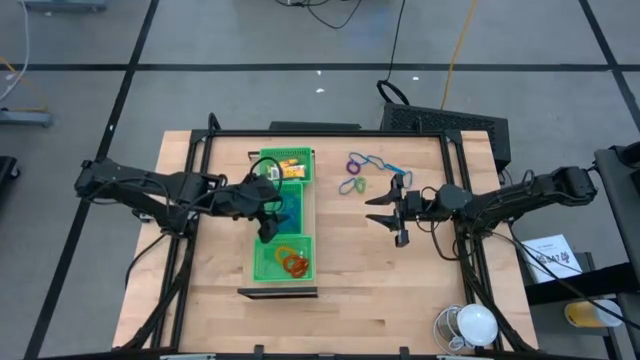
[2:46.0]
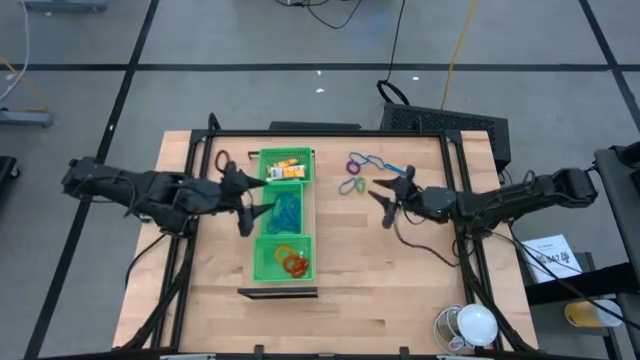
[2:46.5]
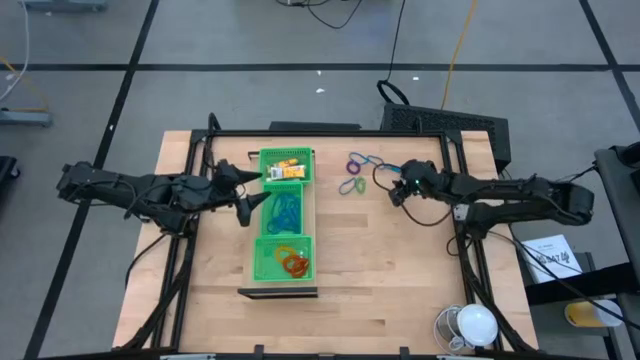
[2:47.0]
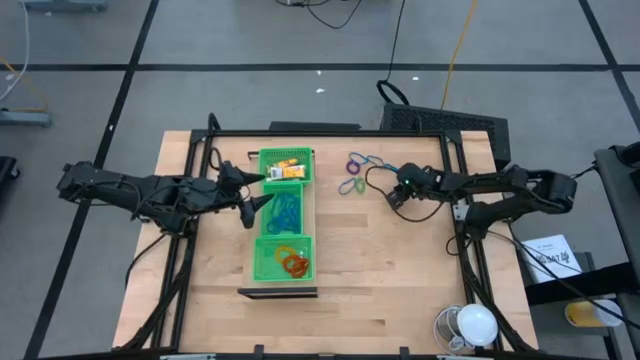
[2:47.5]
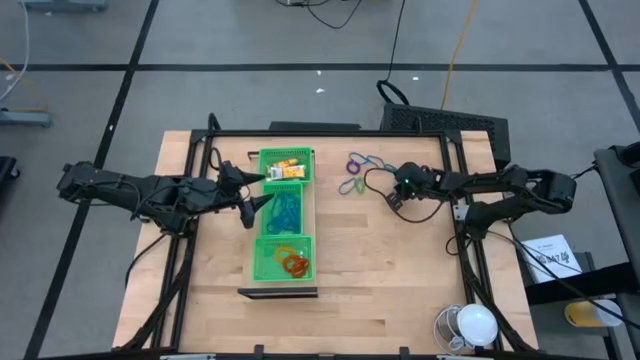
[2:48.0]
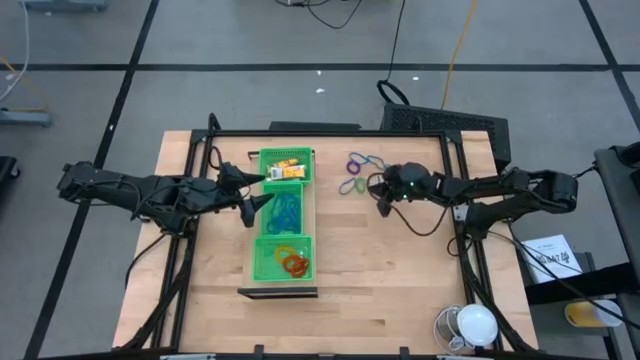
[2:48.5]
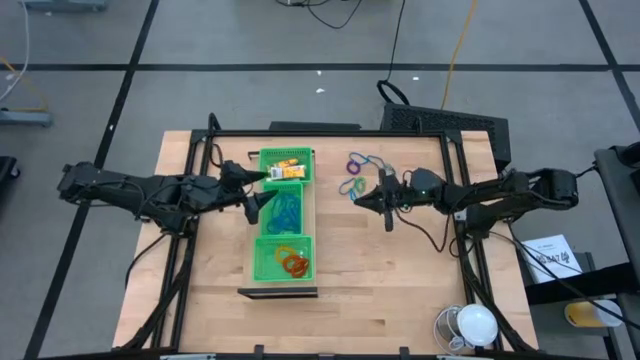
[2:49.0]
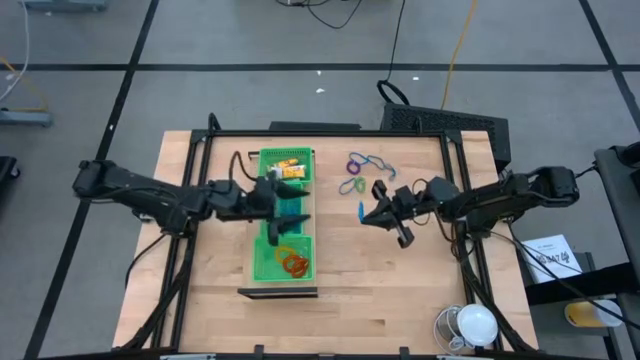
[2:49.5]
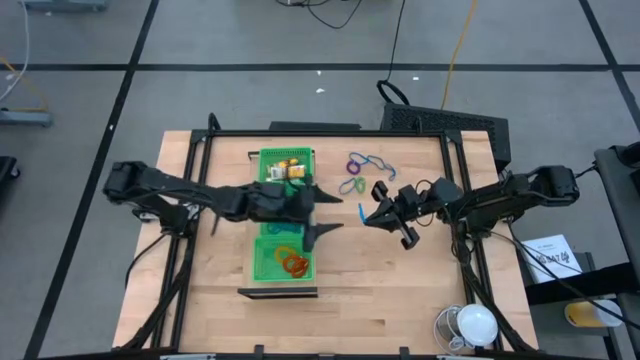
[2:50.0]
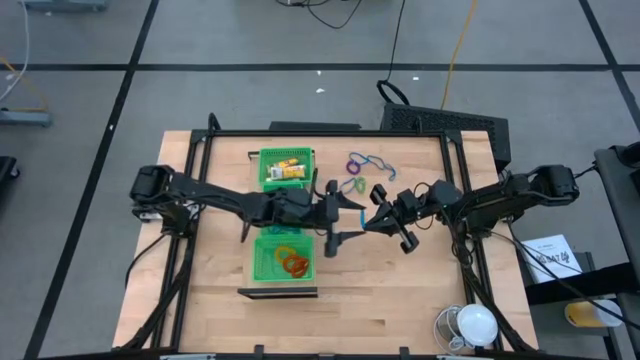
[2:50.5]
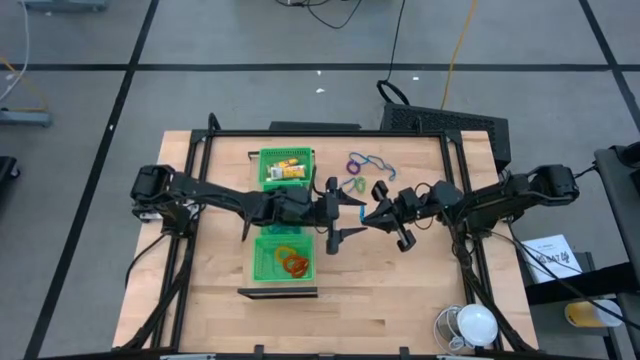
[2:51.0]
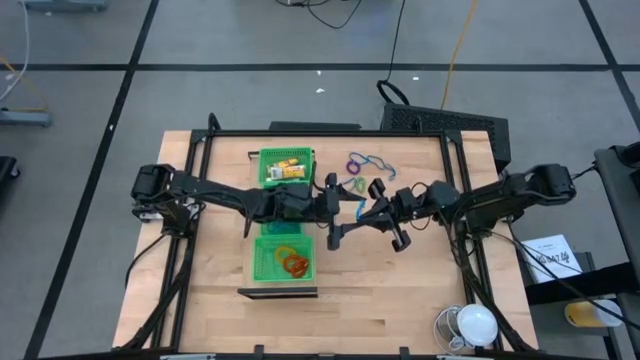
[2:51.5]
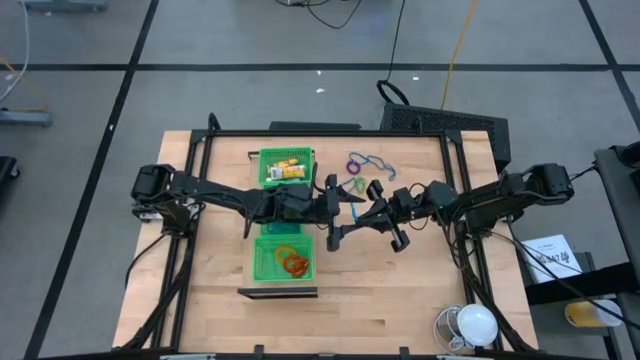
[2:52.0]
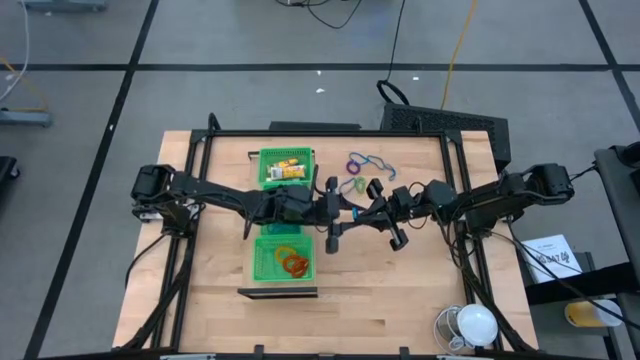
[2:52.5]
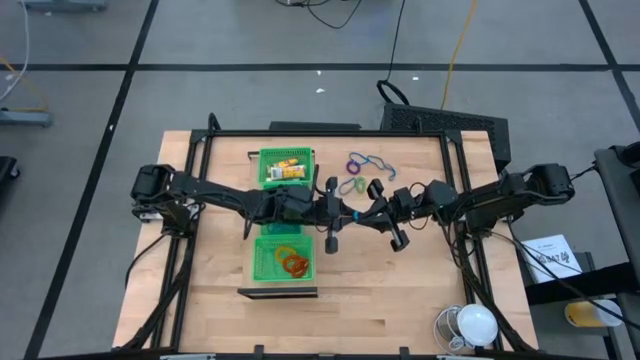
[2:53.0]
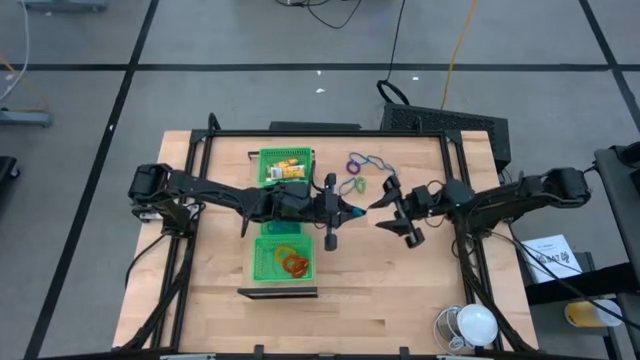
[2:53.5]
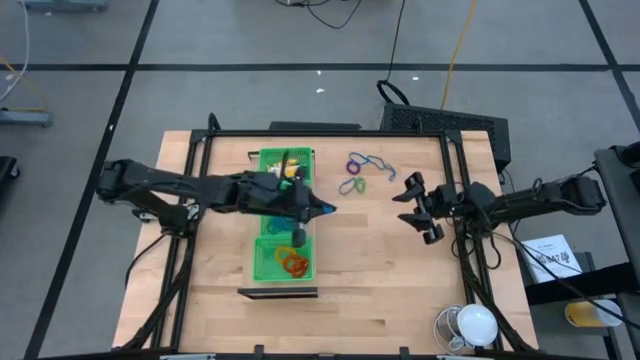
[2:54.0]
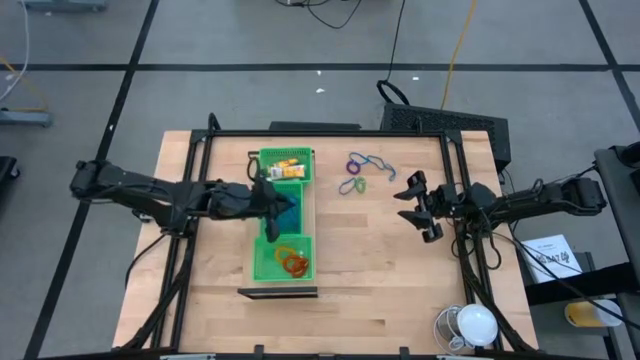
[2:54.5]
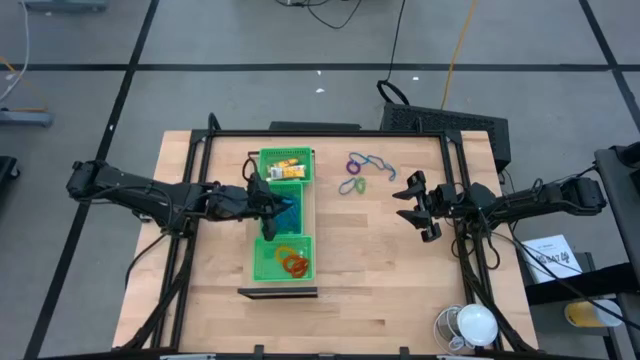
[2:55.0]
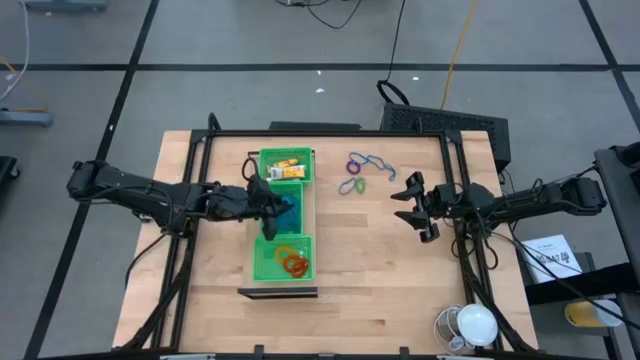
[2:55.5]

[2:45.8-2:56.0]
Task: Pick & Place Office Desk Supplies
Put the blue rubber band into the center green bin on the shelf

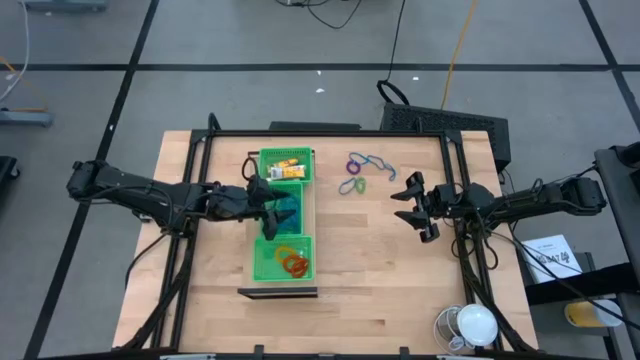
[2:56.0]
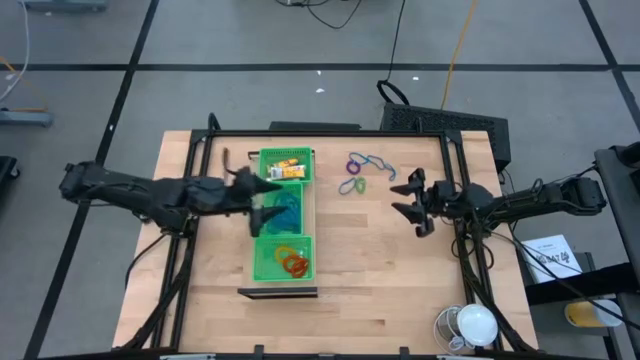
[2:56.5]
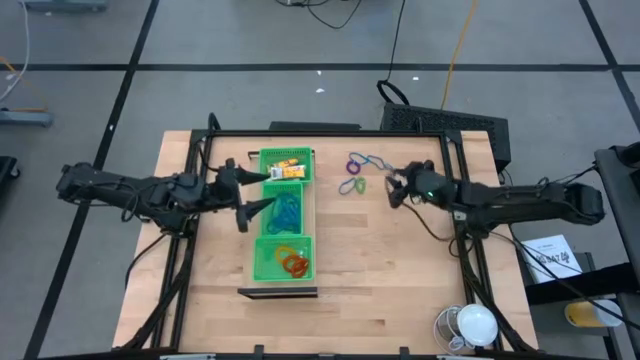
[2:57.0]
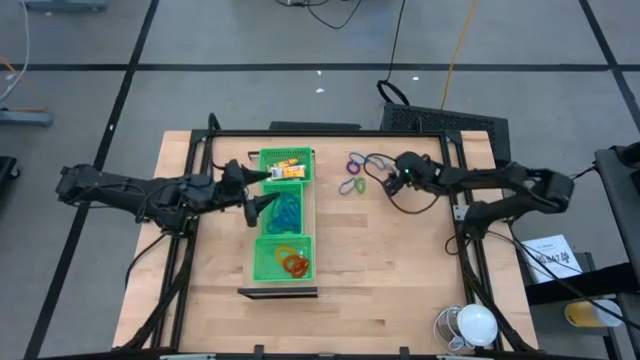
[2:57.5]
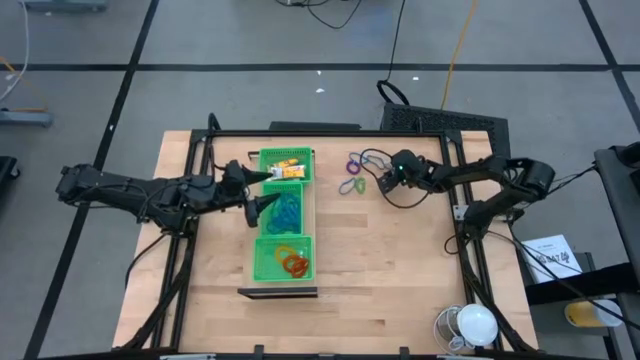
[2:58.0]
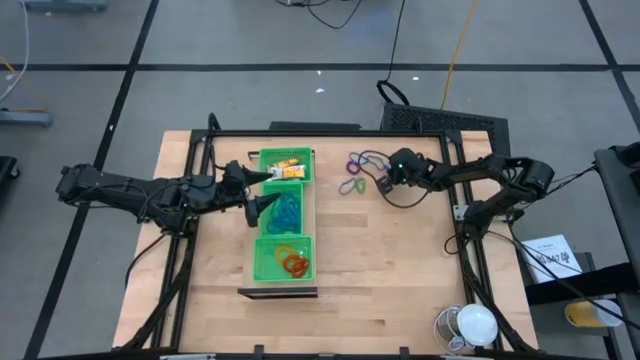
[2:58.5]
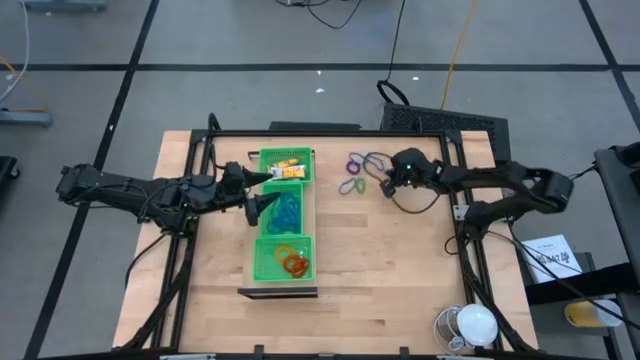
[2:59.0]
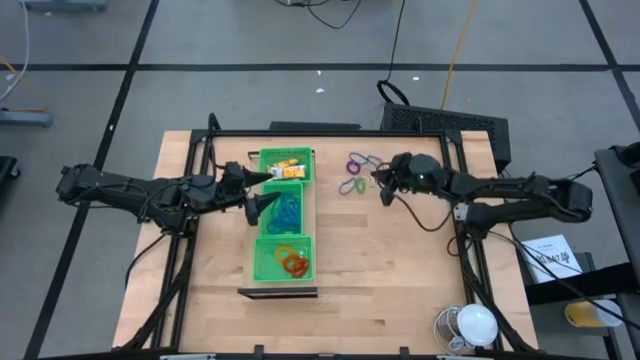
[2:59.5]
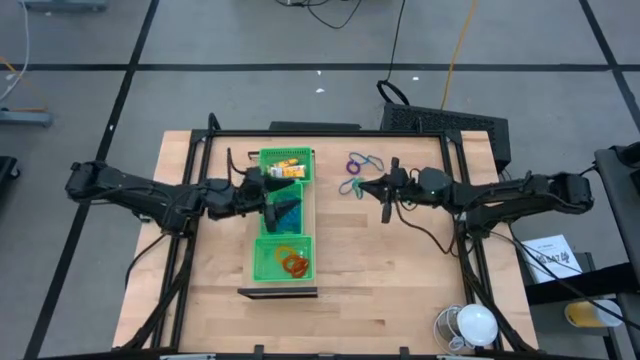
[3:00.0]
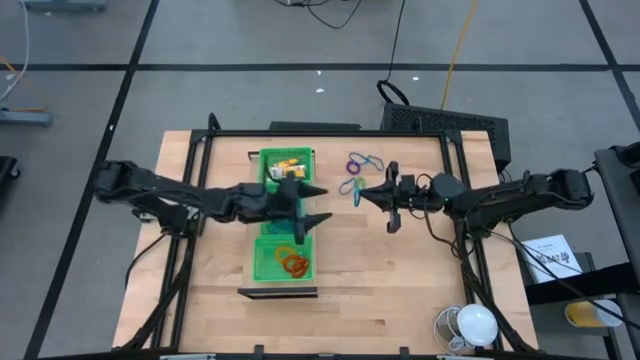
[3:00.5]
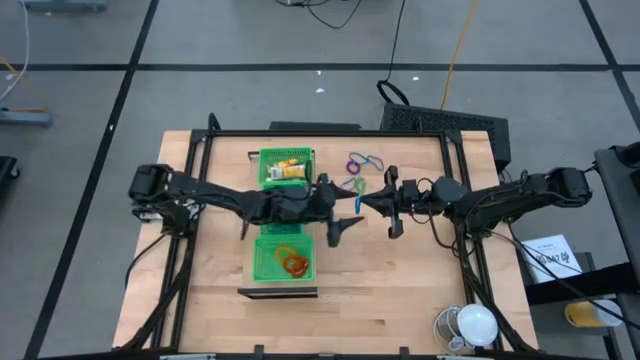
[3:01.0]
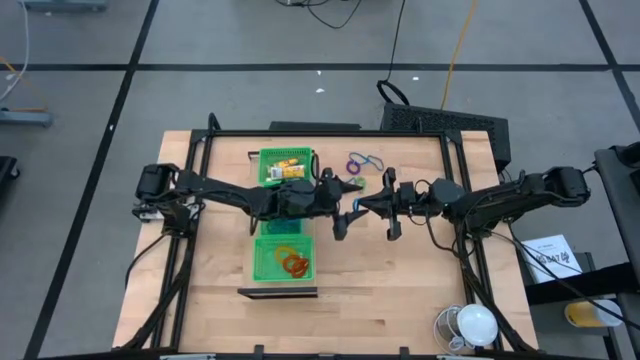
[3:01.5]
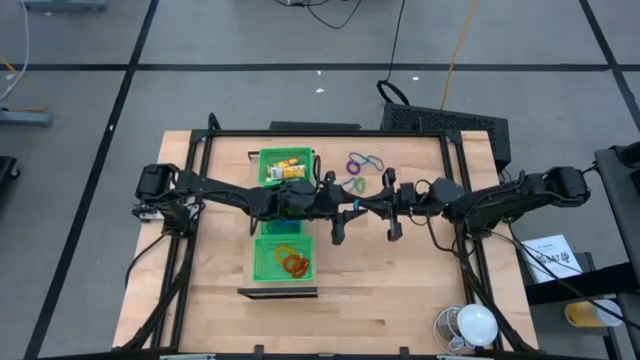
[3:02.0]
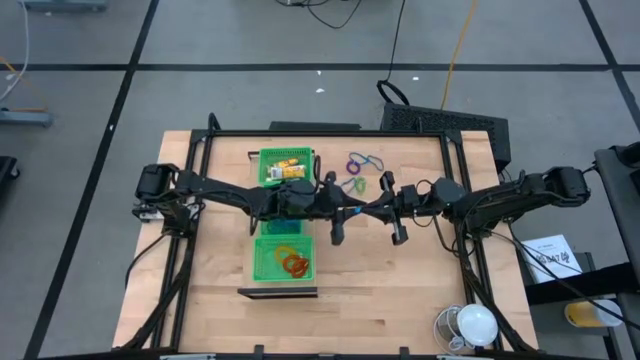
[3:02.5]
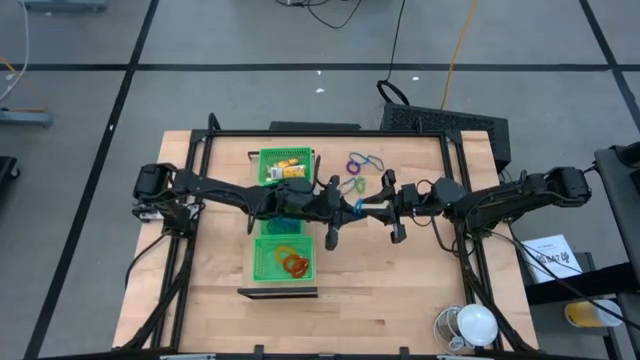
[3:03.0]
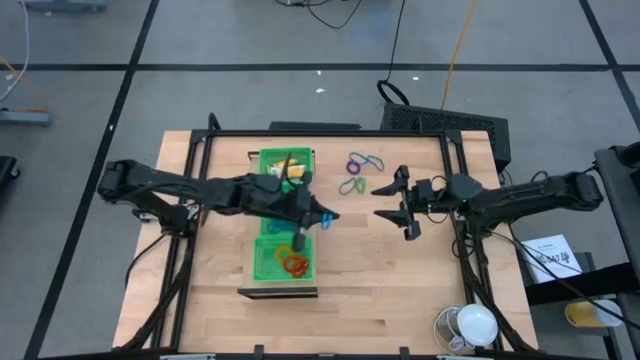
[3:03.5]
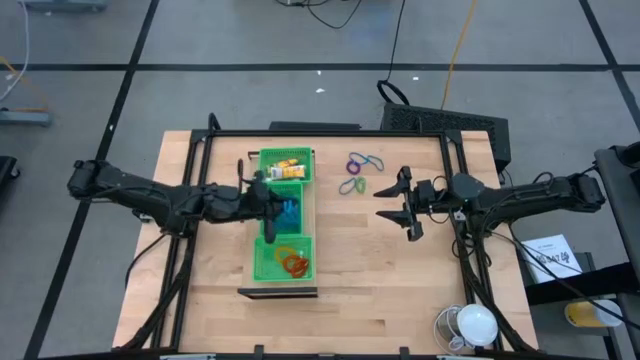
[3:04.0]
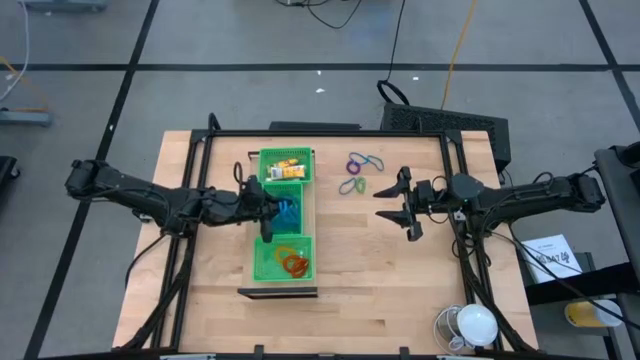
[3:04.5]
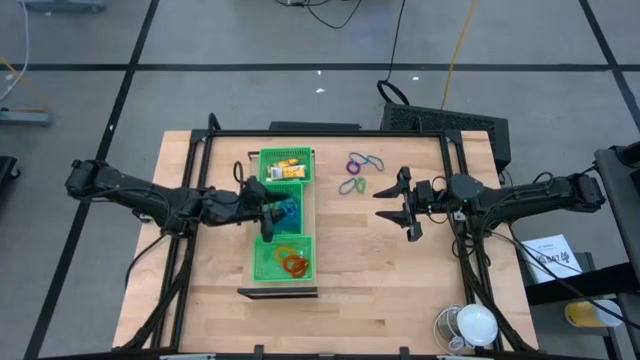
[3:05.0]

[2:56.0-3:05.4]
Put the blue rubber band into the center green bin on the shelf

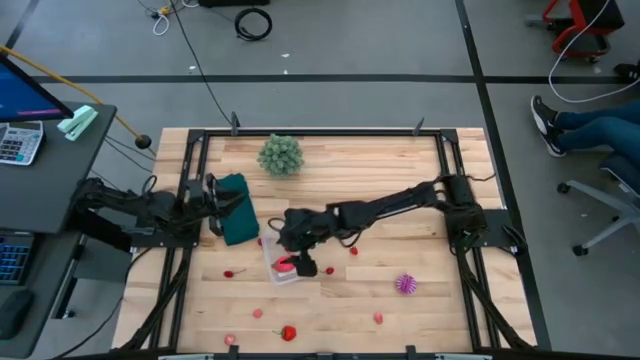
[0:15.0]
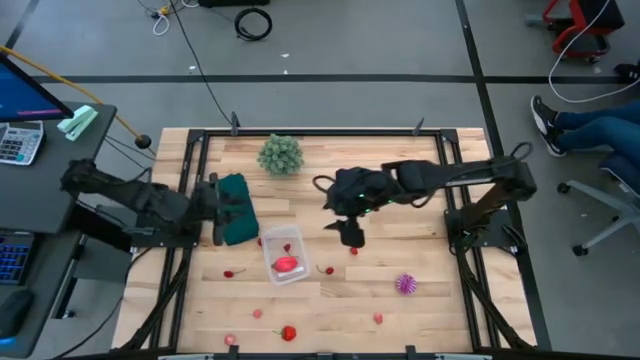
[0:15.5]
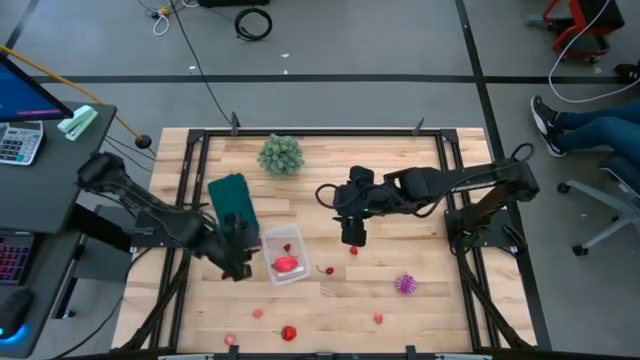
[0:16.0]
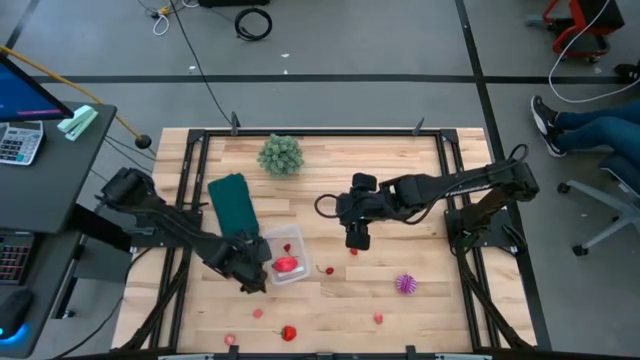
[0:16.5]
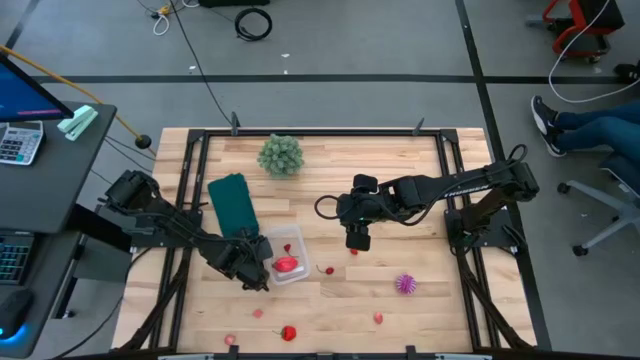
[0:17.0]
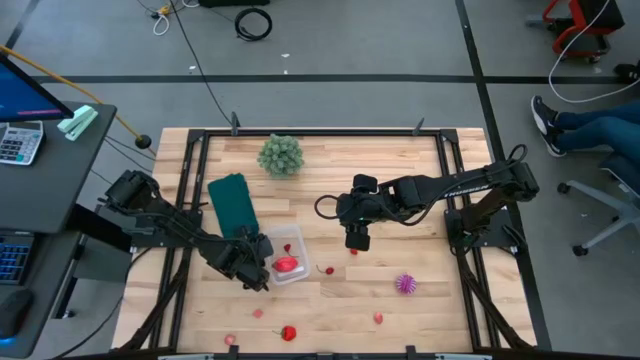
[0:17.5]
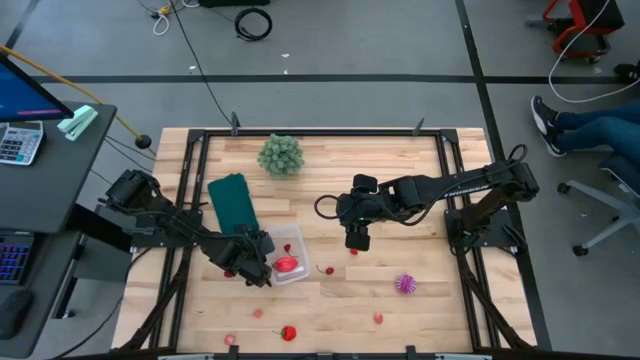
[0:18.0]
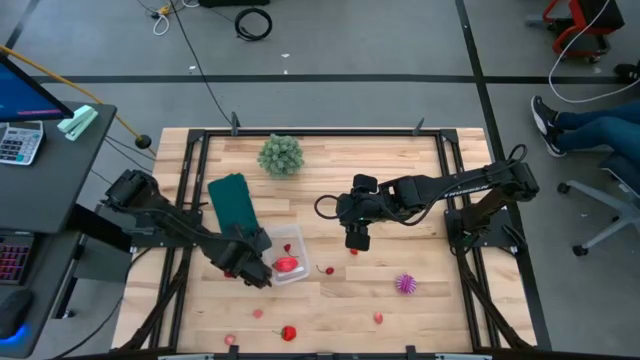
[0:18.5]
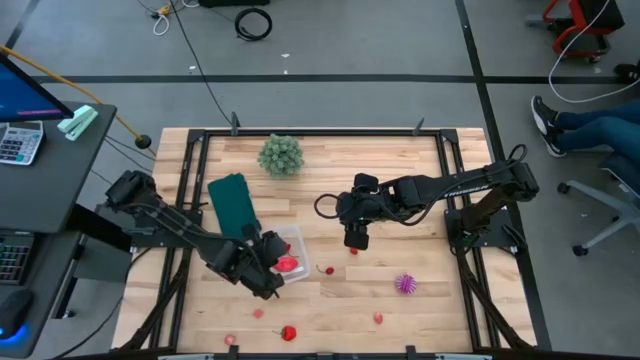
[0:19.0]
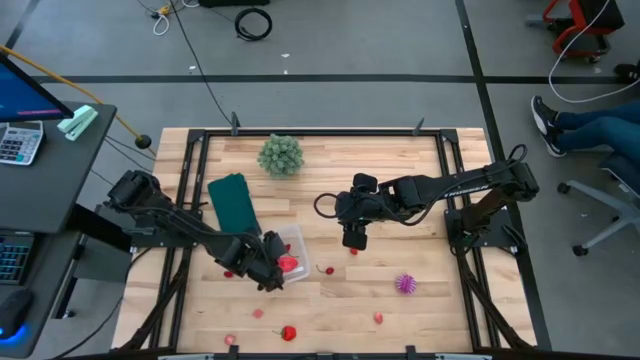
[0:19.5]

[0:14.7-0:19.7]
Task: Pick and placing Produce into tupperware
Put the red cherry into the transparent bin
